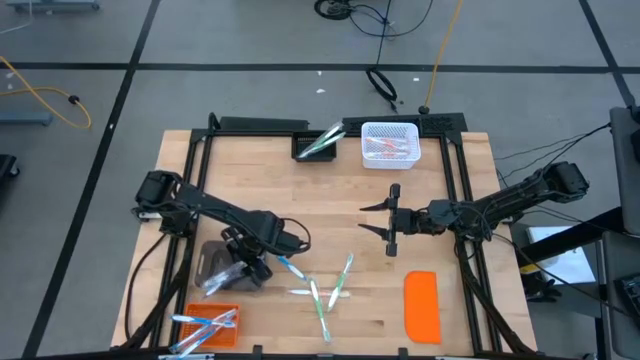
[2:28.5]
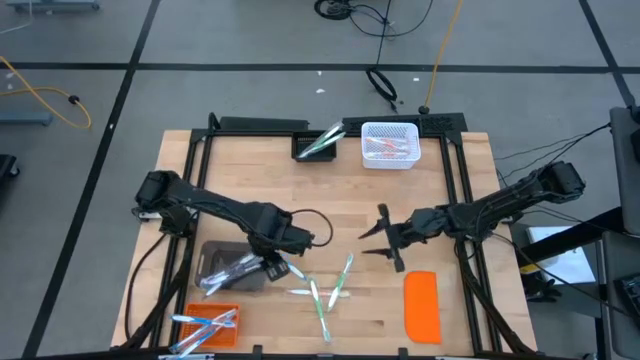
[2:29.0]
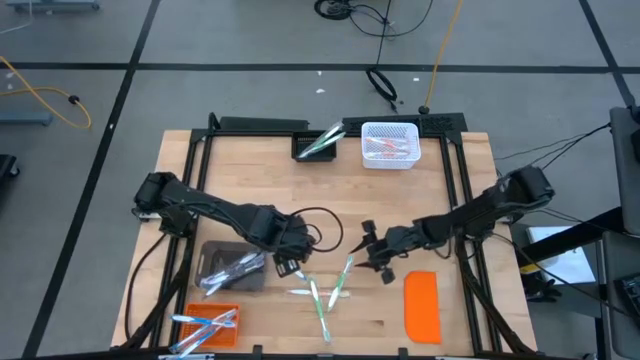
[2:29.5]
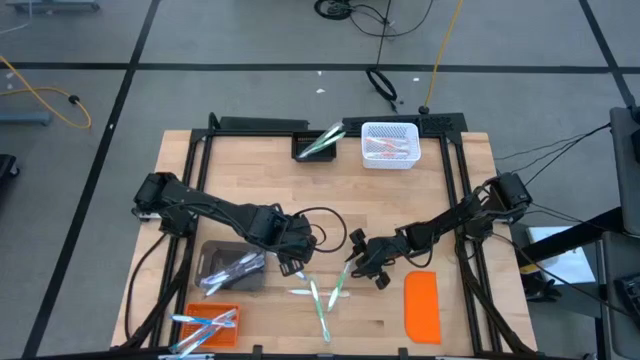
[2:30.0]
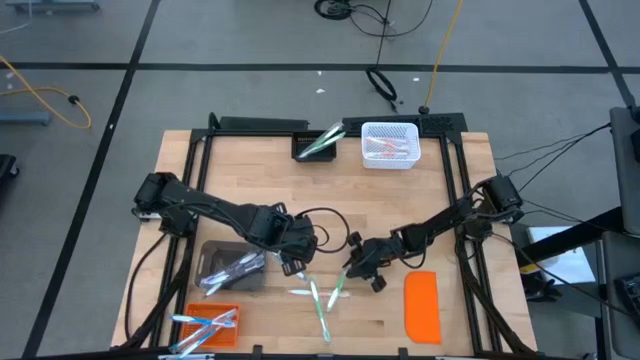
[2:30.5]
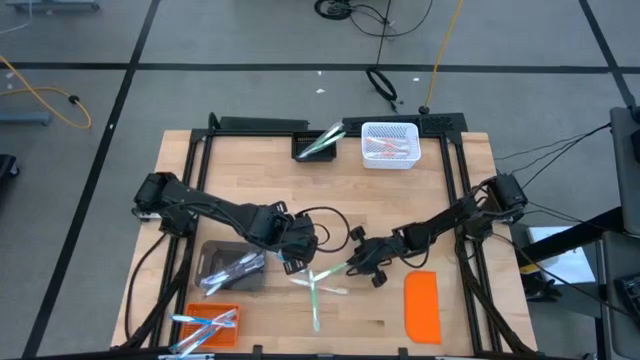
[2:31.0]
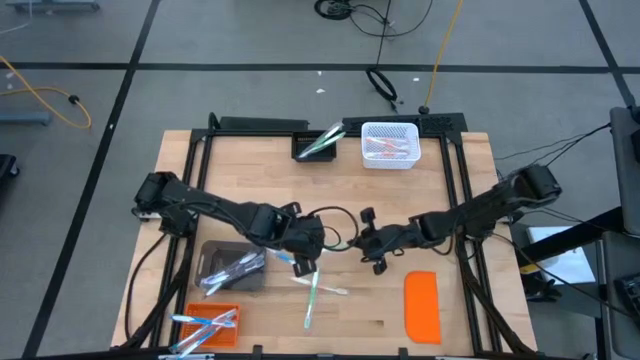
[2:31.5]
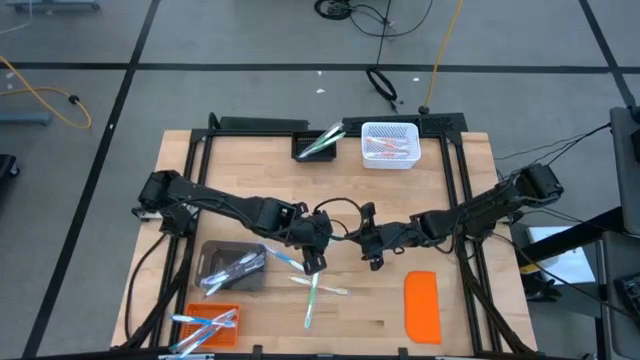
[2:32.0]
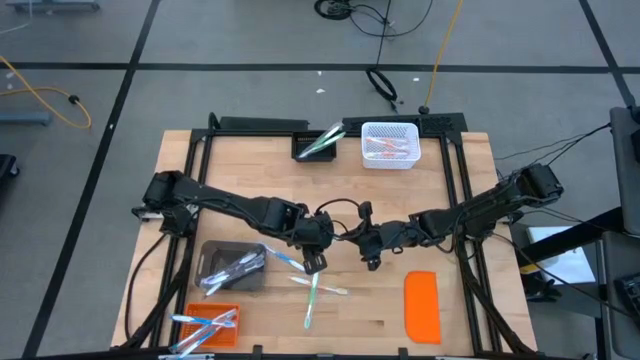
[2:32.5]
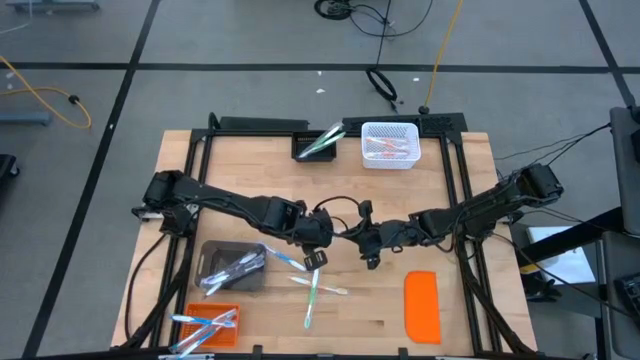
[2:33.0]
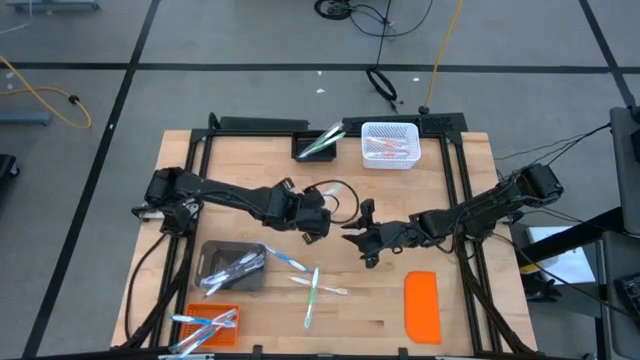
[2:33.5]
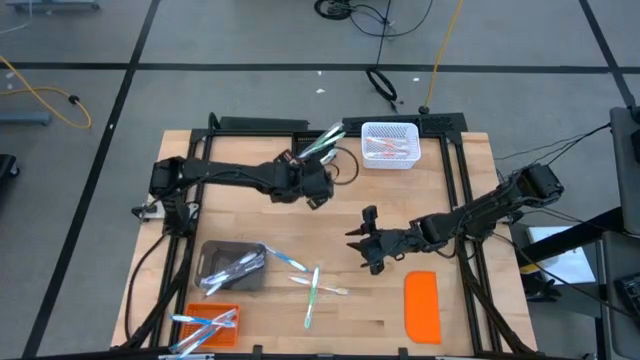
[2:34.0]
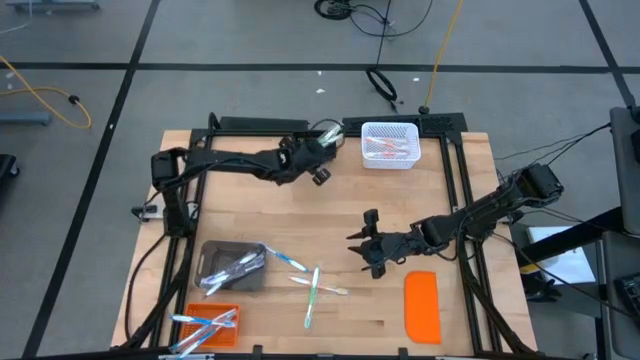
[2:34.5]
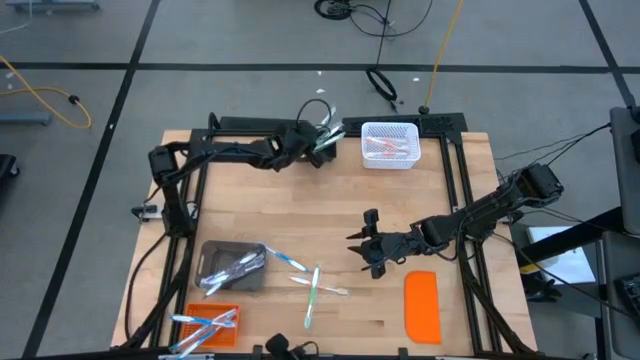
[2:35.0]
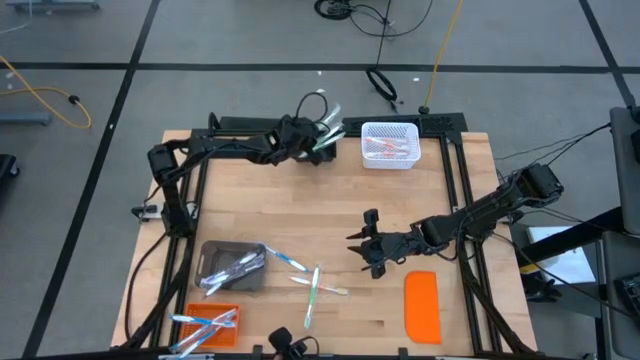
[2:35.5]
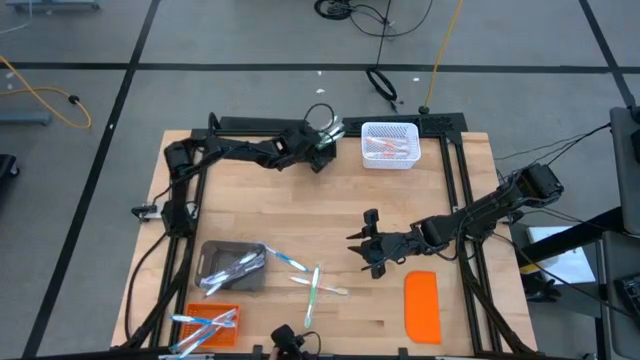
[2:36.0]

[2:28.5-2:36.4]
Task: Pick & Place Toothbrushes
Put the green toothbrush into the black bin

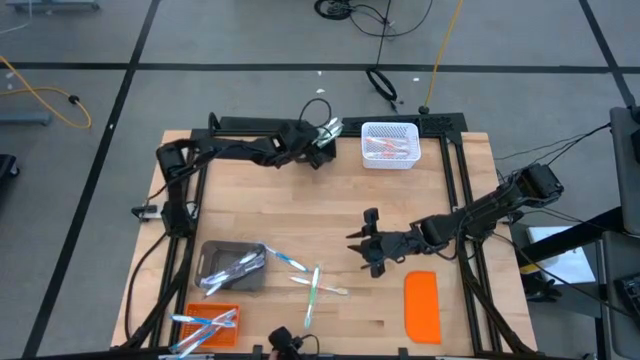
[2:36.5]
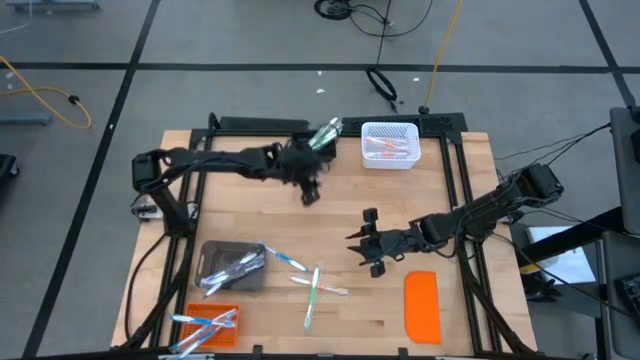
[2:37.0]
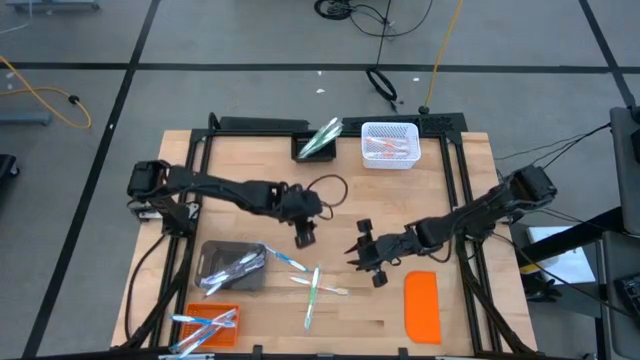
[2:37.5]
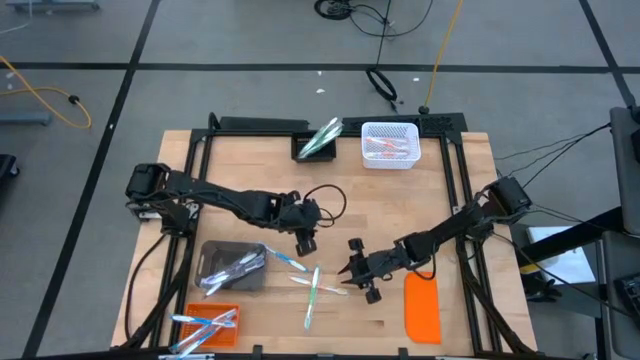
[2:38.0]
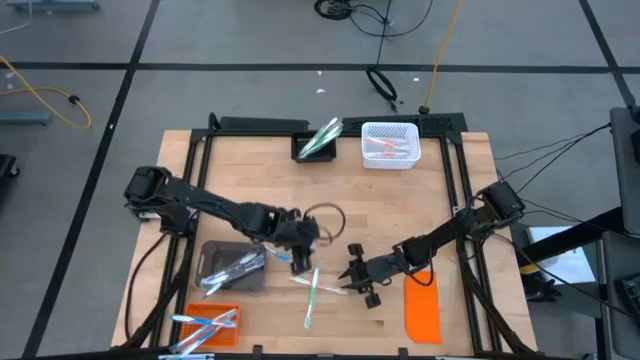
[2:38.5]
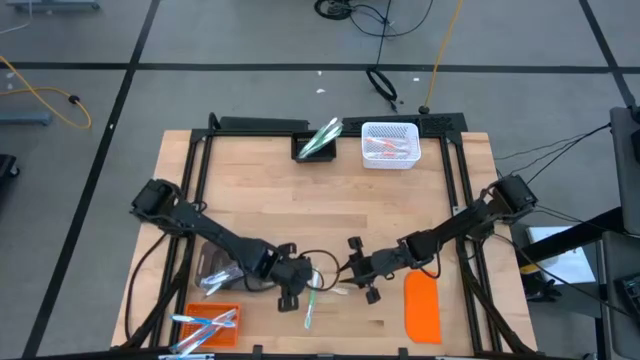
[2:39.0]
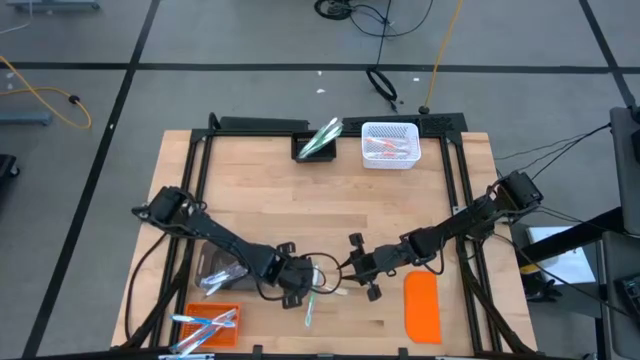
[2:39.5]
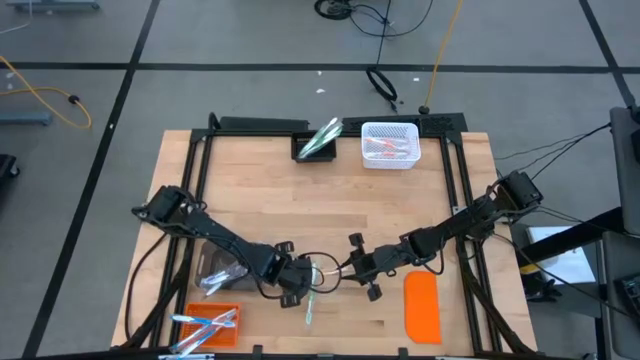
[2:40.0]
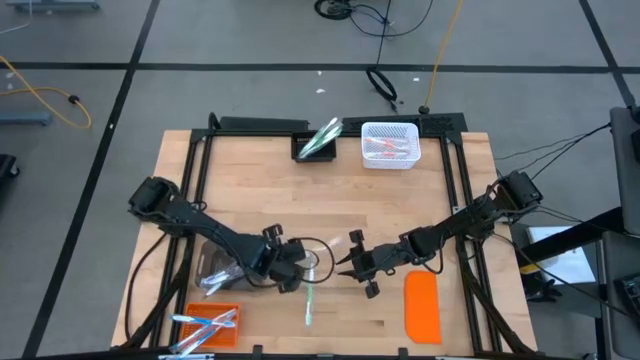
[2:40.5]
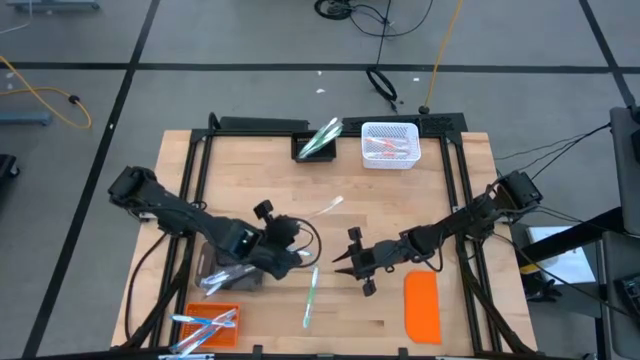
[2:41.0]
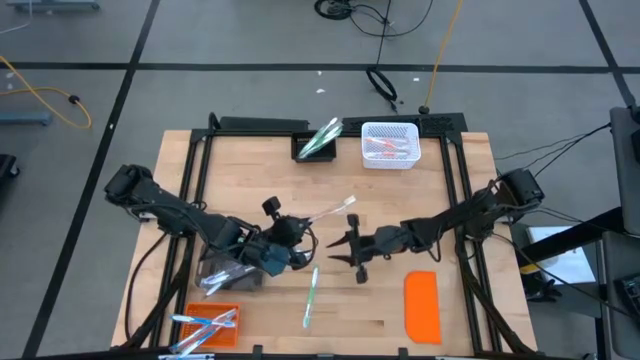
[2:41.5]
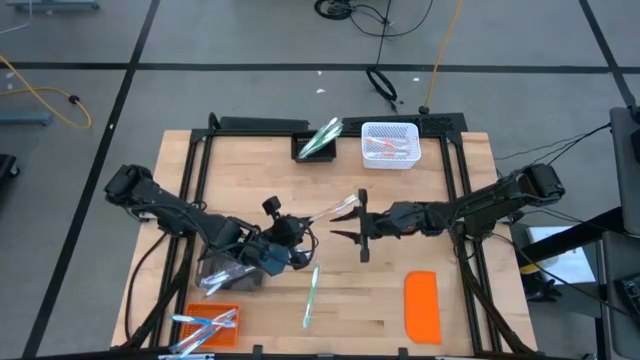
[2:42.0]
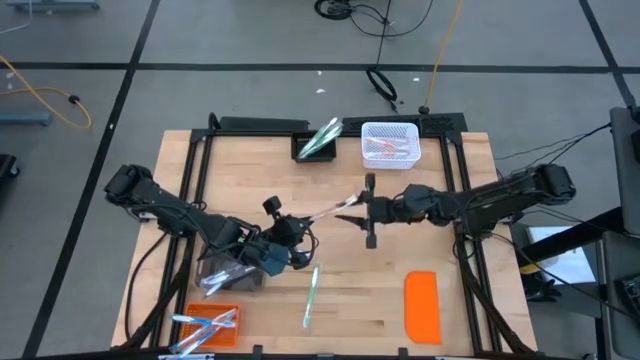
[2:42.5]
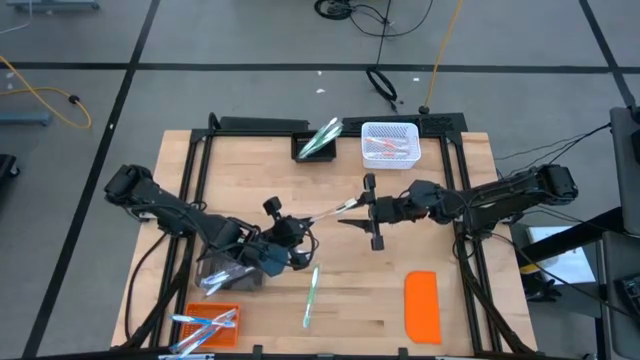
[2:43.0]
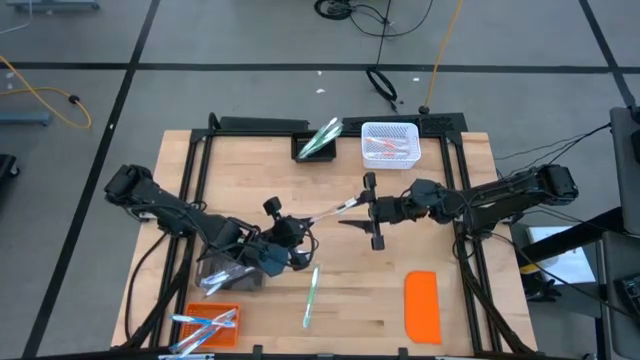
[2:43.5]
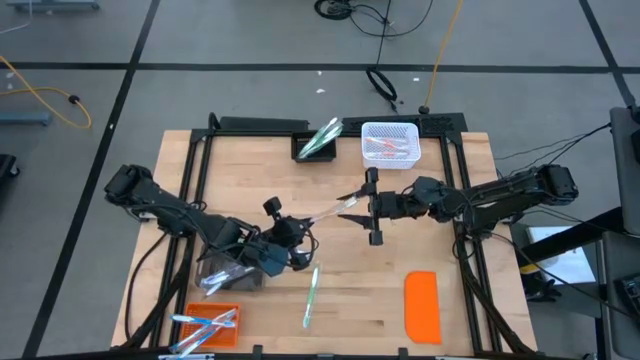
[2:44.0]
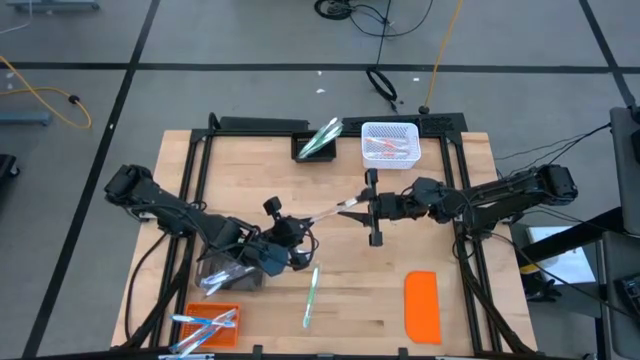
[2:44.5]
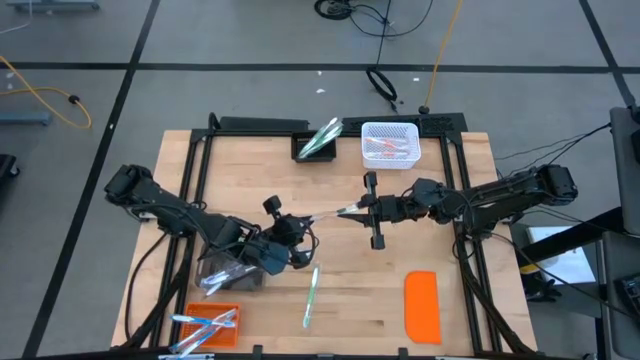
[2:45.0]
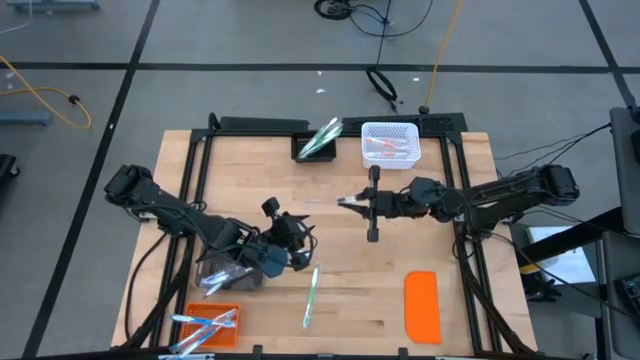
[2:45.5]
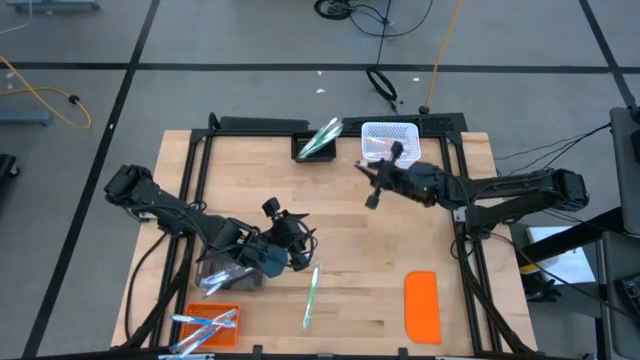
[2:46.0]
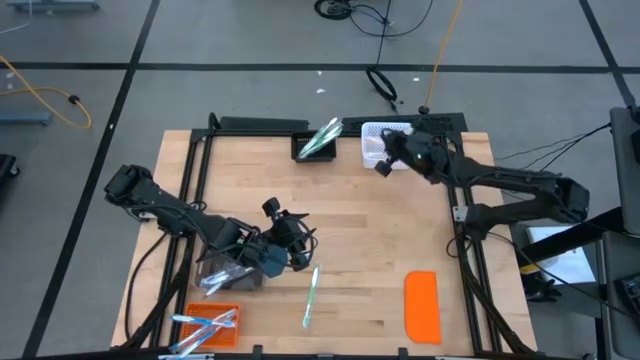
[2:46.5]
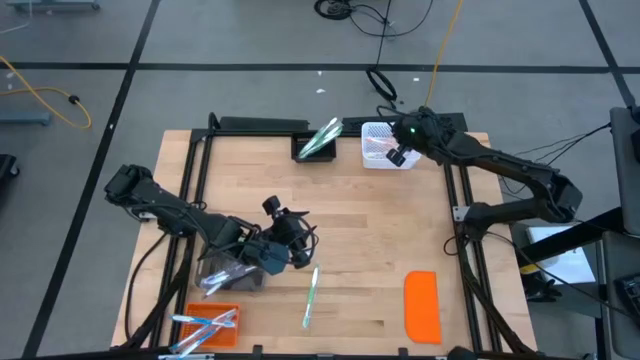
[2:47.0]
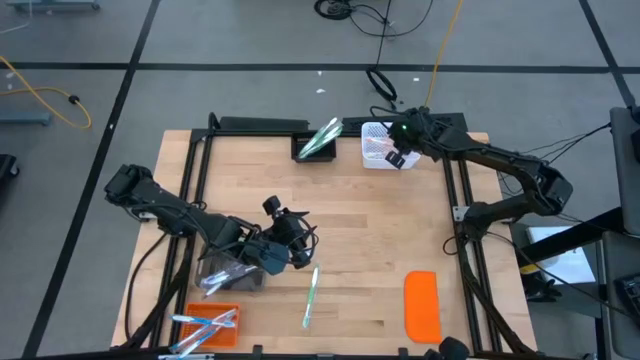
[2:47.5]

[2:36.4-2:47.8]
Put the orange toothbrush into the white bin
